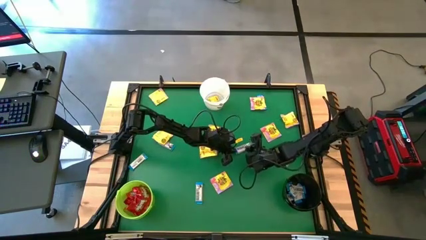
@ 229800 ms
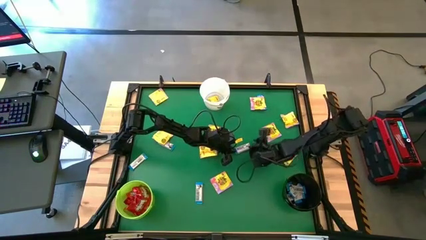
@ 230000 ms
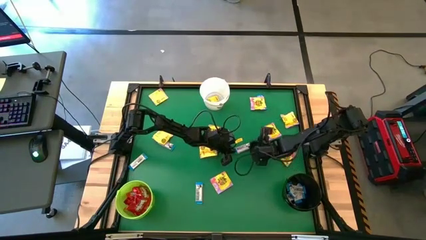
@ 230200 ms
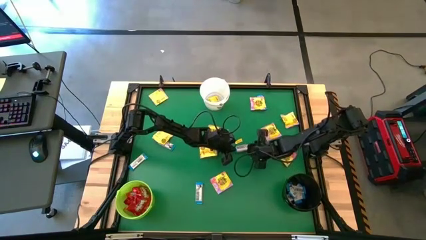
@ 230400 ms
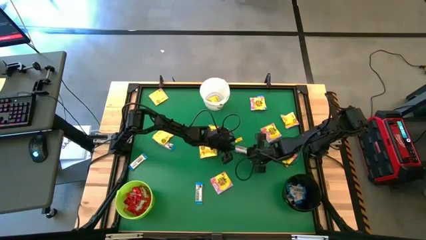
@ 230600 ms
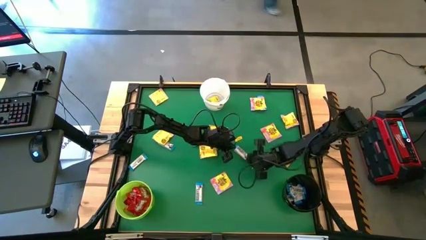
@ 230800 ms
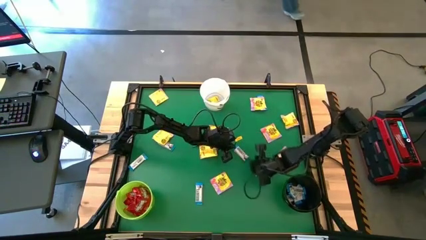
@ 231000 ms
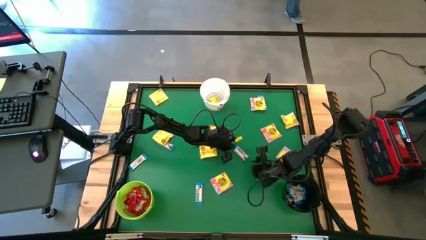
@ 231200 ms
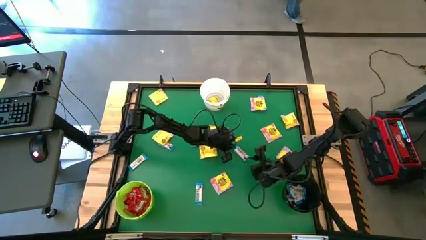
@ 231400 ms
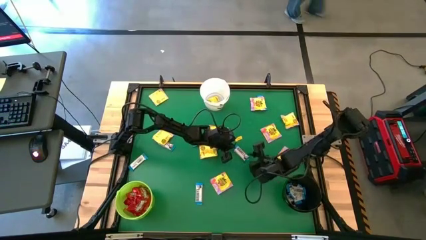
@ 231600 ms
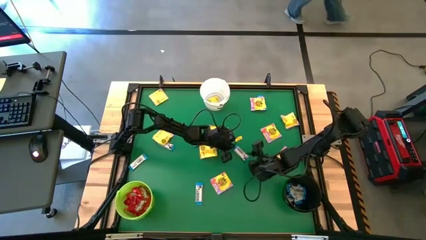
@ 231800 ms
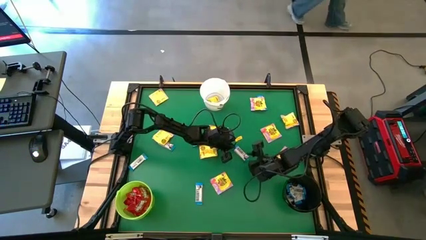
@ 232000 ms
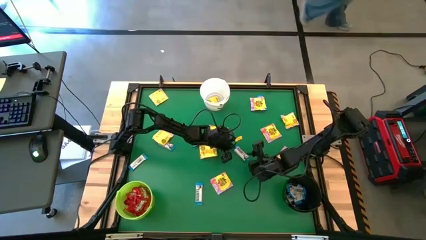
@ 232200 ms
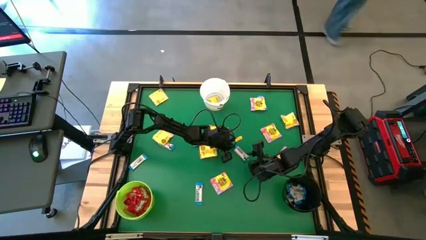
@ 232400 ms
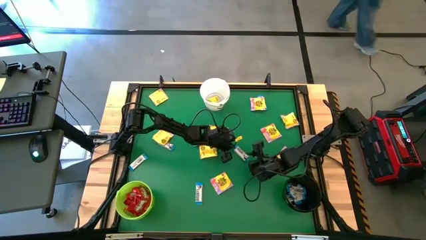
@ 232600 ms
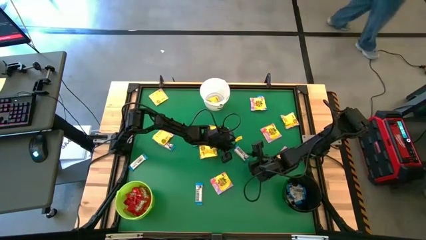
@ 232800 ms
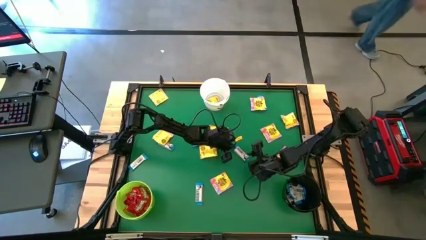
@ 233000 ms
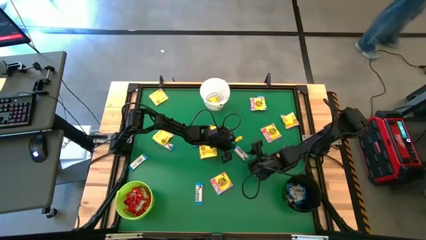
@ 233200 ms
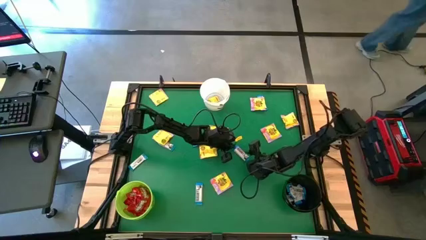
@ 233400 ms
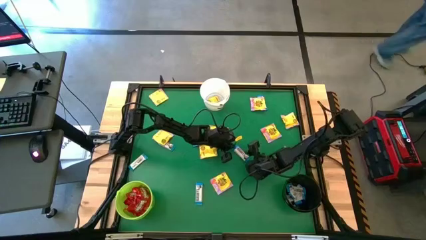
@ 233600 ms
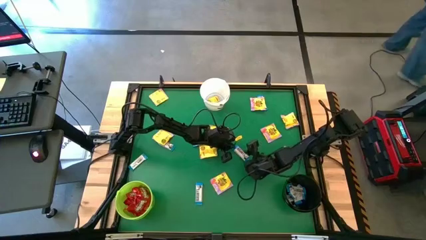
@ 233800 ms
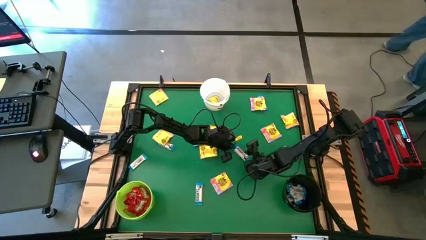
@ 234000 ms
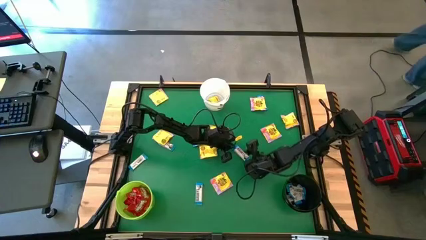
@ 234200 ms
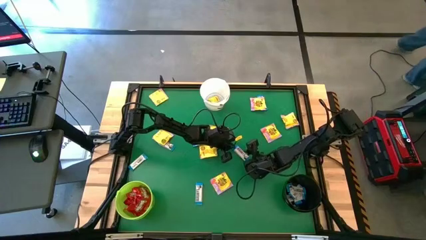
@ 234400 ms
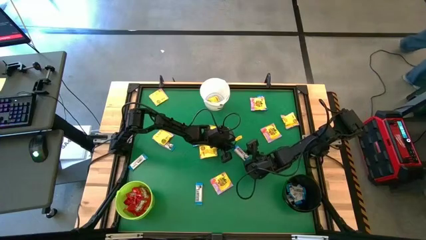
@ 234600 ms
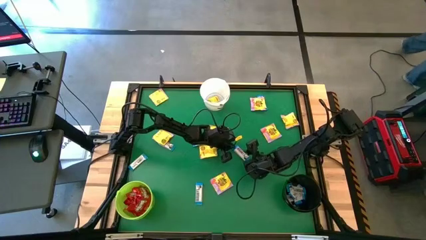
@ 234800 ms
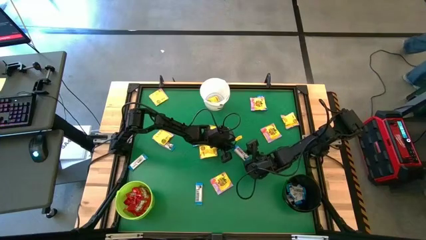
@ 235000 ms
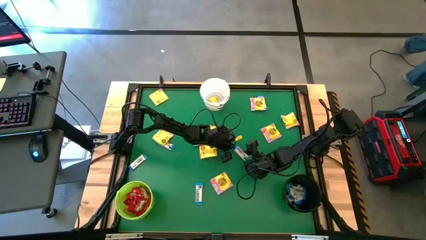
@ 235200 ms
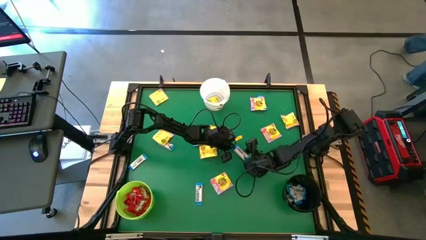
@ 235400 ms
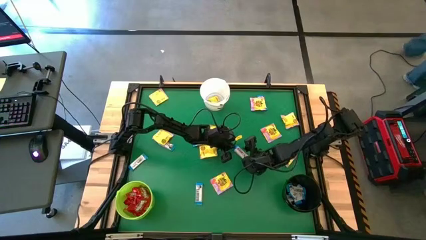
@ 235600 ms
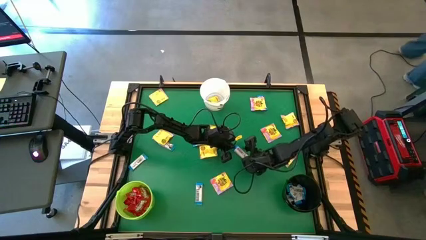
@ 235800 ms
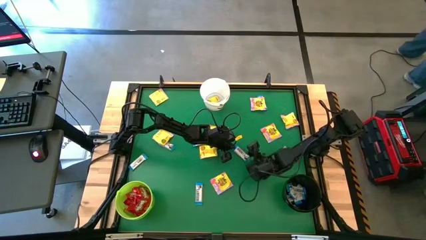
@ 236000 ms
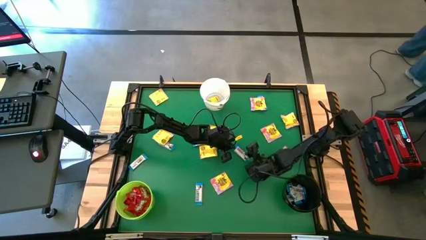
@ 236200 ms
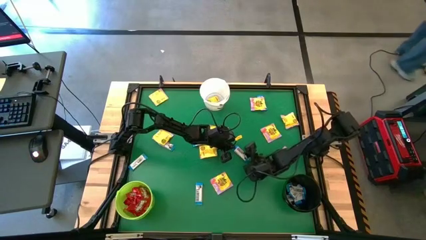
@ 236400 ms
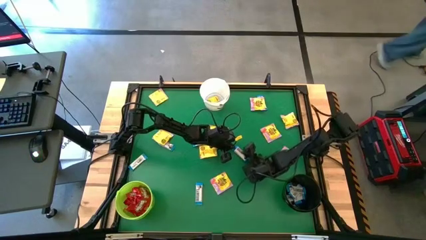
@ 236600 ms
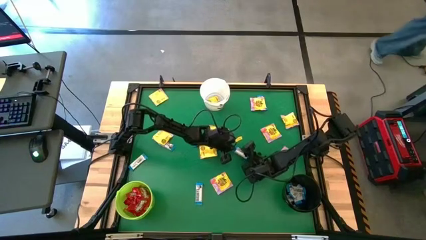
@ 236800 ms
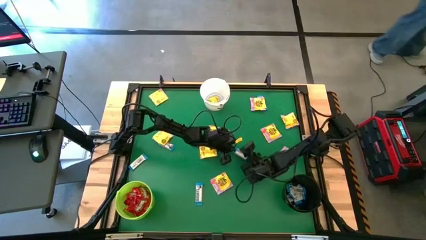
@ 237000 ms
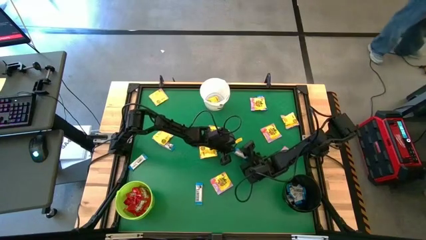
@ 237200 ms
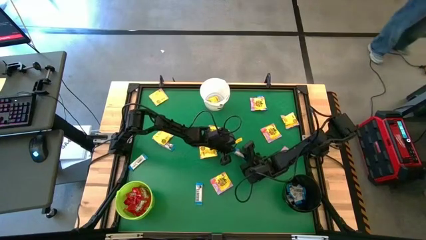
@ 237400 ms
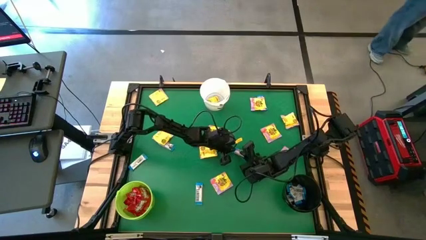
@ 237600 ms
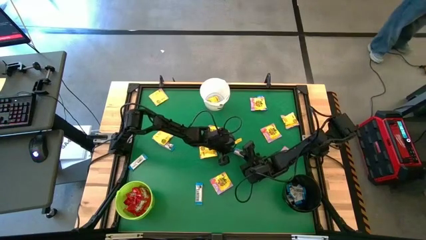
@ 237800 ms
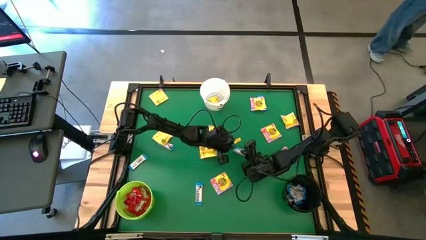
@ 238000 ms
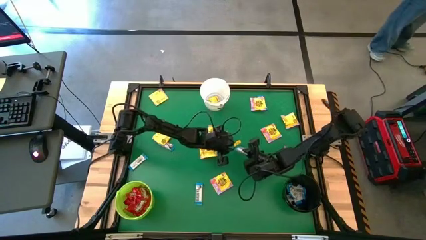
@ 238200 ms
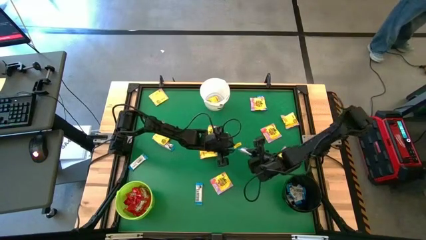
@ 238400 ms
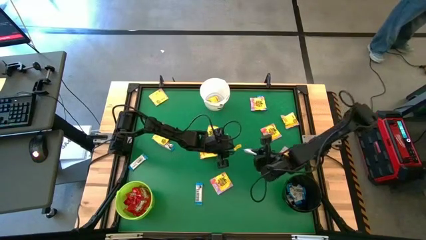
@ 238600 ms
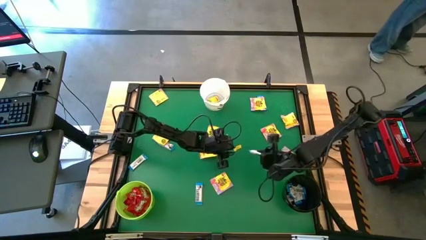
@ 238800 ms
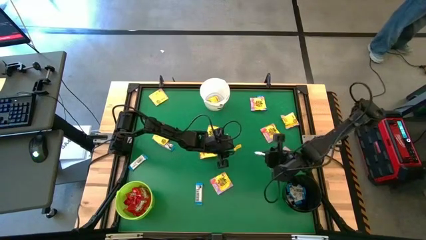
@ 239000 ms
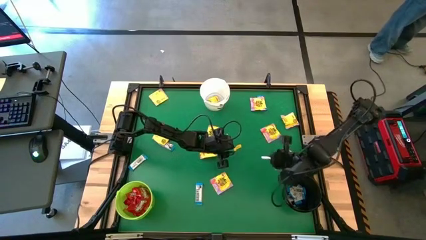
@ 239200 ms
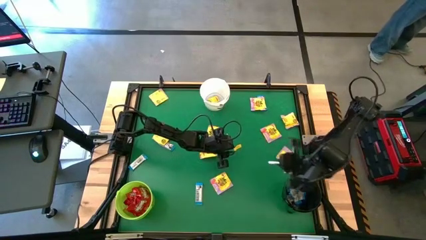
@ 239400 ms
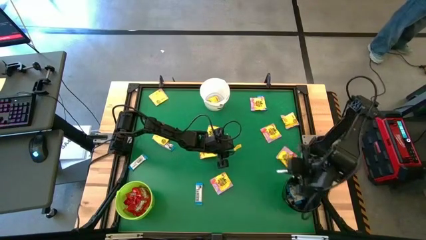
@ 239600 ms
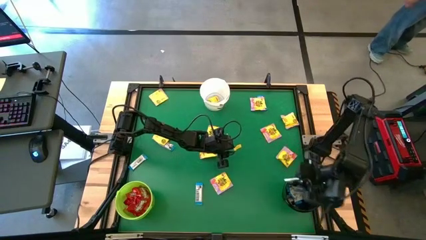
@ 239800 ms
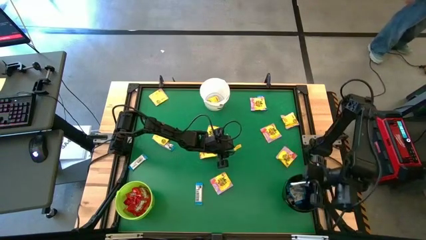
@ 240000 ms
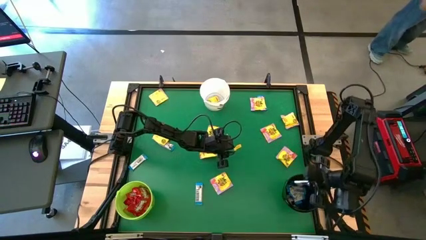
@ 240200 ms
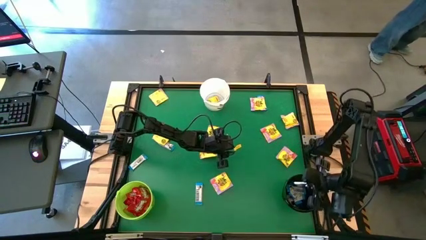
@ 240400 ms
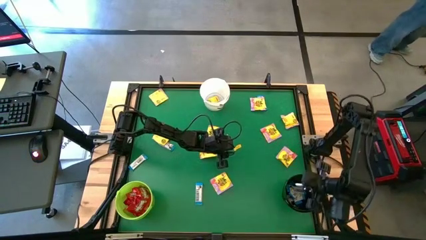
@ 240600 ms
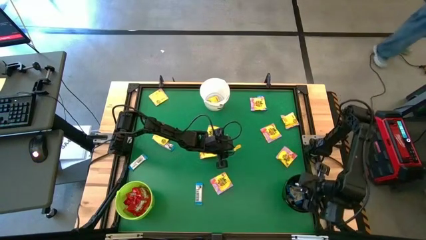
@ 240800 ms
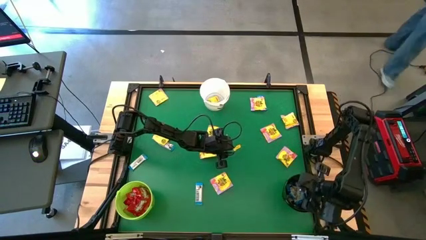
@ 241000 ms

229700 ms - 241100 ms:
Task: Sort candy by brand, put in halloween buckets
Put the white candy into the black bucket

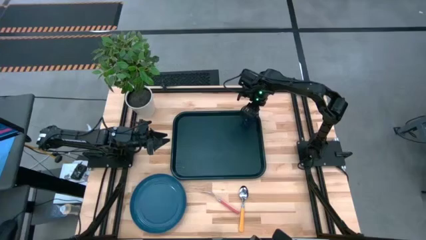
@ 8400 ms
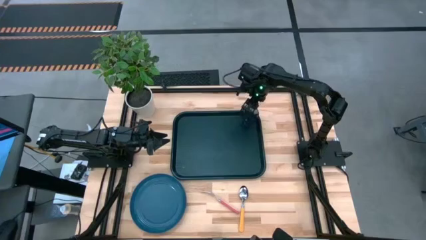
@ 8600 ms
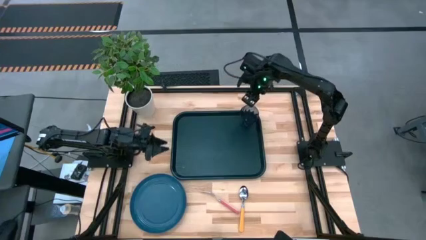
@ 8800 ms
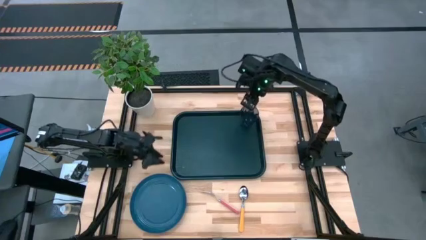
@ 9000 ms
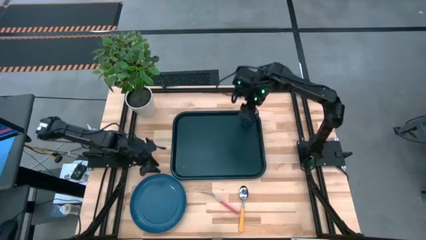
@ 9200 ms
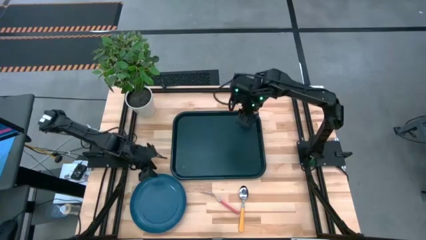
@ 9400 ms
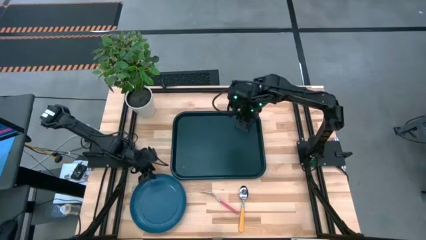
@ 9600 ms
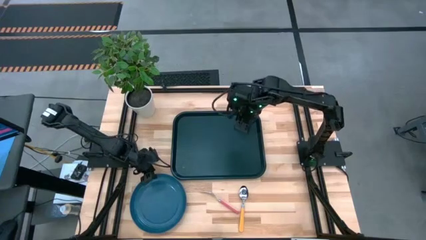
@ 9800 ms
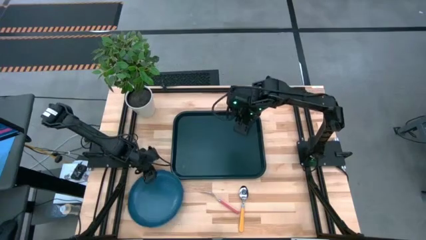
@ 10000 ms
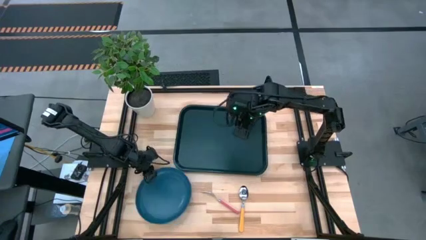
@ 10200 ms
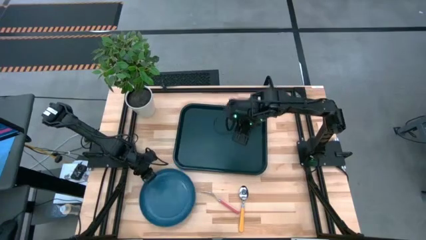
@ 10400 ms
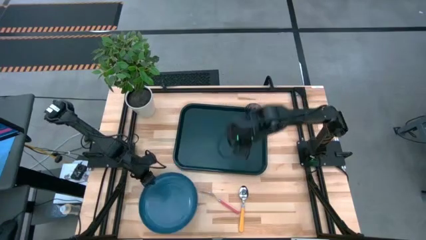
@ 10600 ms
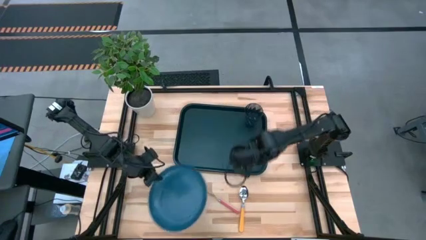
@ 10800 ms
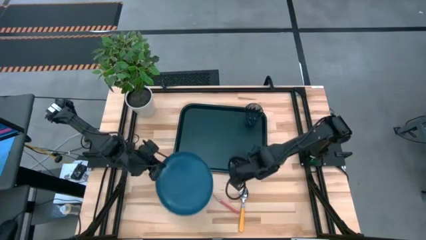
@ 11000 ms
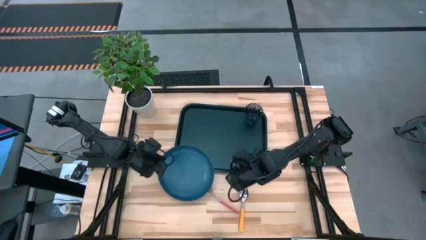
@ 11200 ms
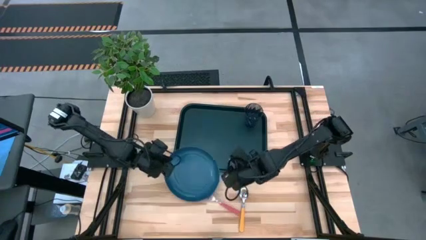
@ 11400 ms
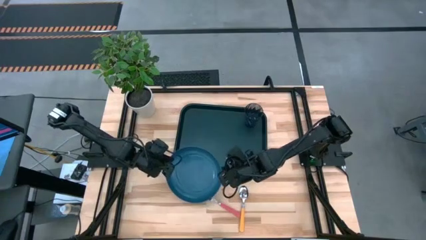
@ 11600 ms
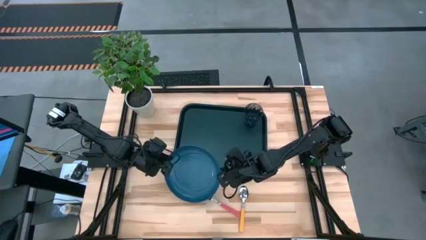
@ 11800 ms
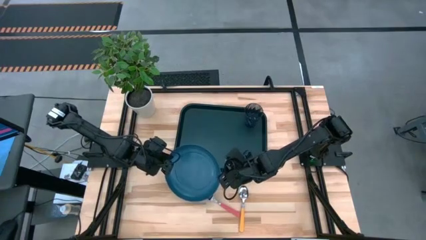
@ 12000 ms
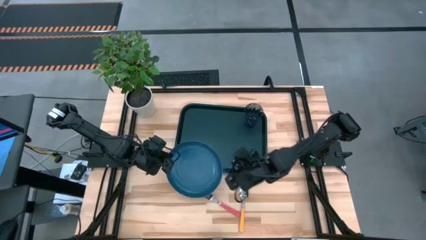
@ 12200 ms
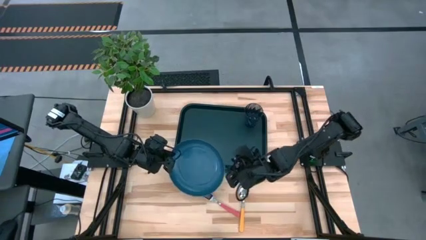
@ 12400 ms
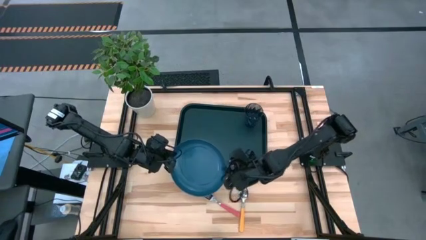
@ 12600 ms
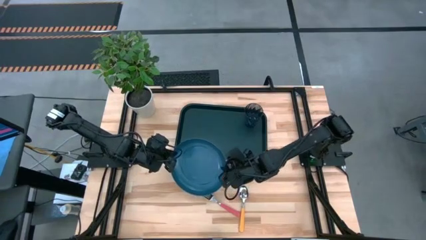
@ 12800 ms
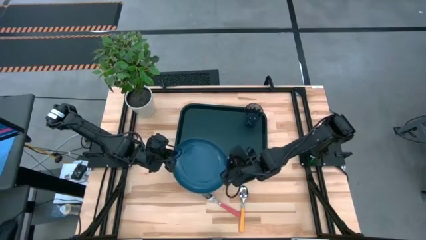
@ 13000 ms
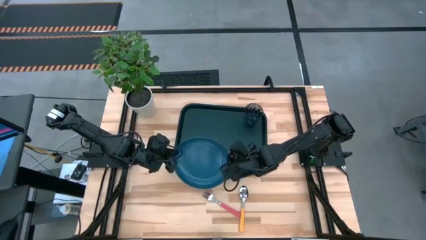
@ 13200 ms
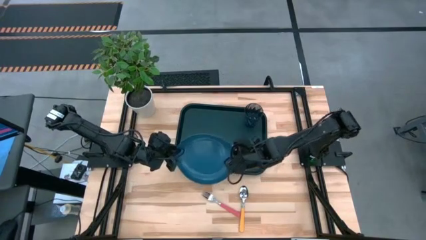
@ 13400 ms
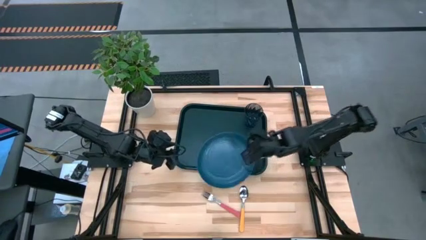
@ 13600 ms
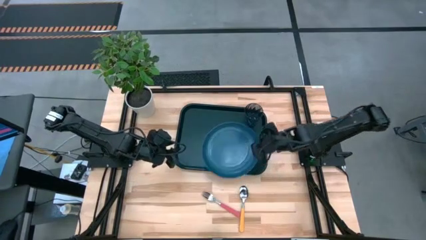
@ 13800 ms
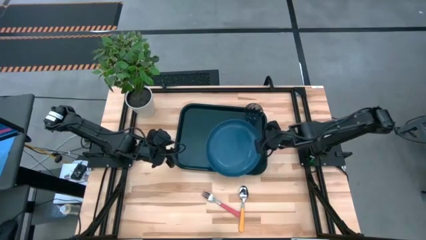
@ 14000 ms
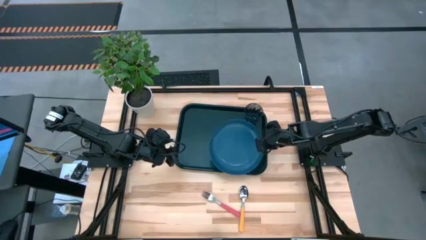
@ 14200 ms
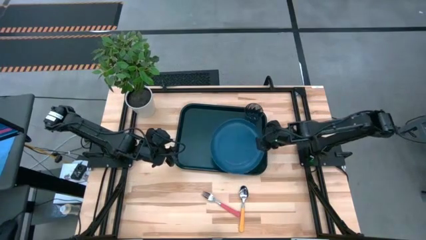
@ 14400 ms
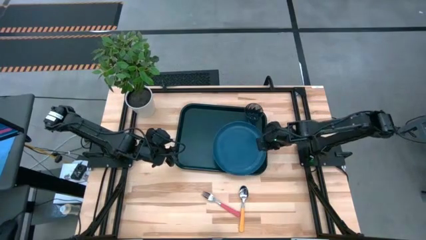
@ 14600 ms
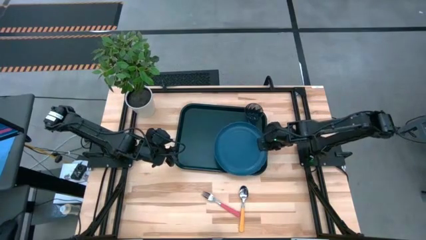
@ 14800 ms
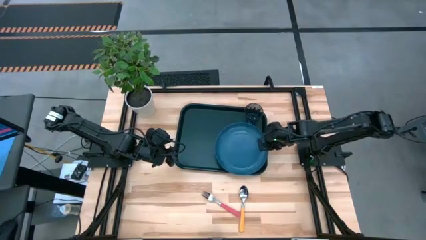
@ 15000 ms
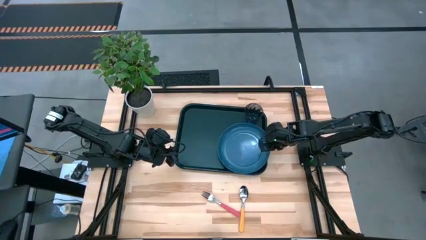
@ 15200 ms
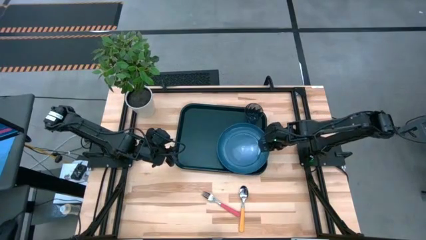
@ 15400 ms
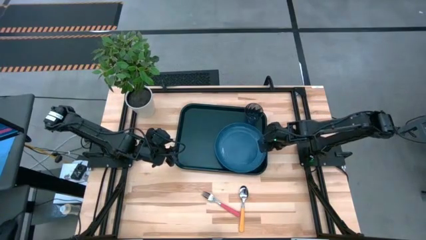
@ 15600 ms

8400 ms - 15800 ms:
Task: Pick and place plate/cup/fork/spoon on tray
Put the blue plate on the black tray
